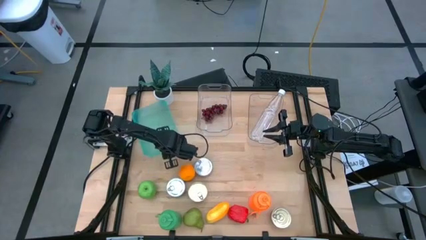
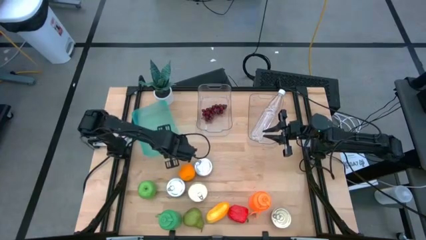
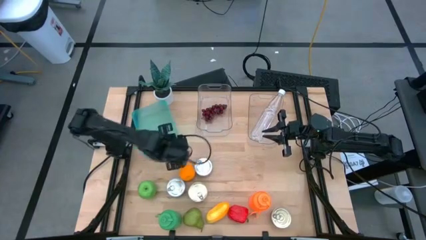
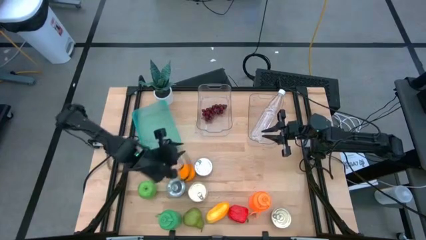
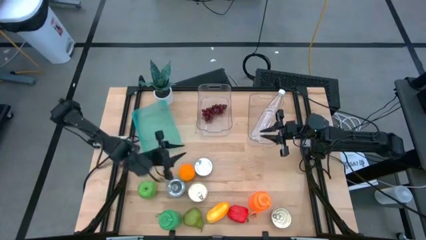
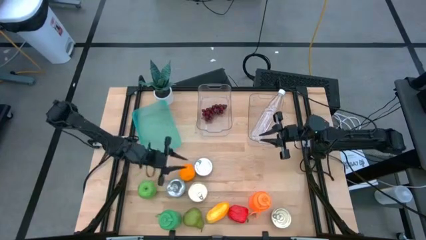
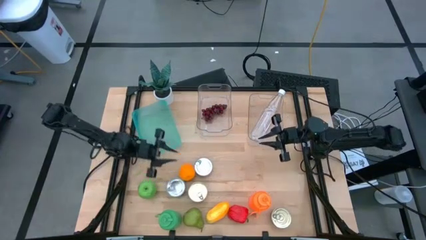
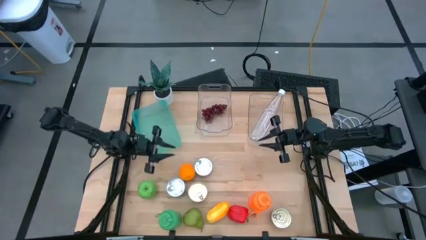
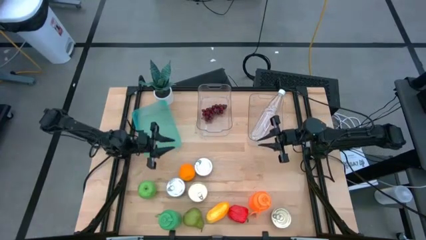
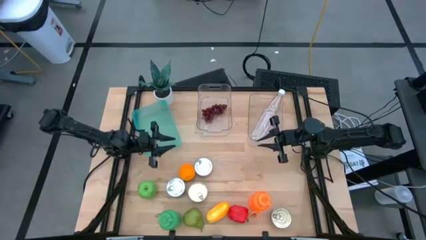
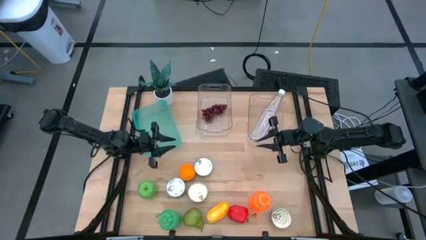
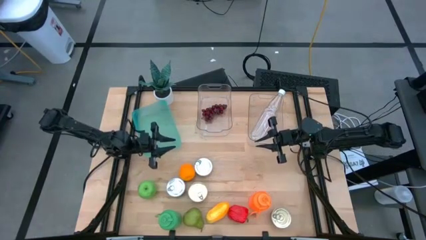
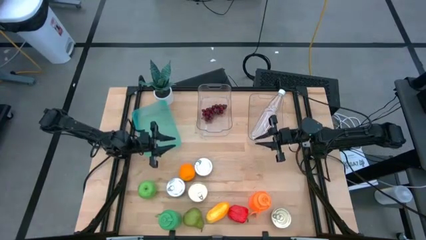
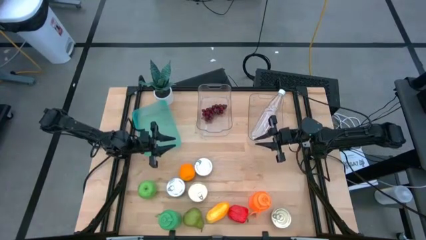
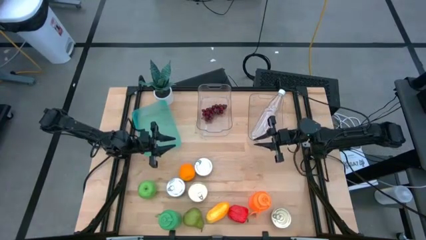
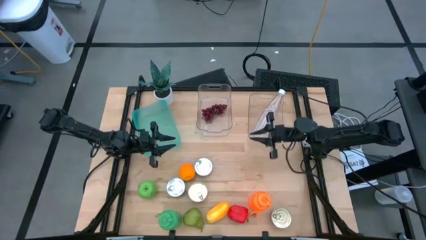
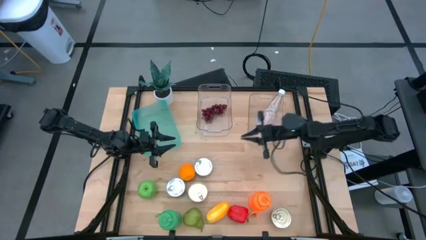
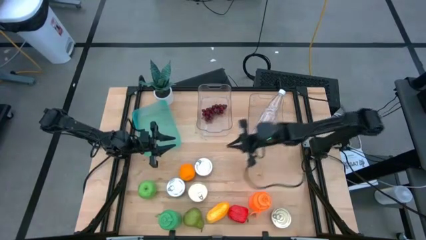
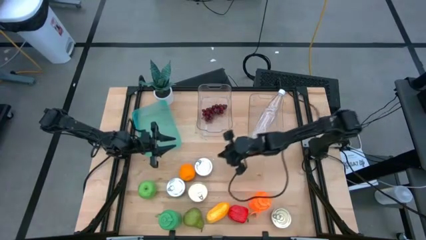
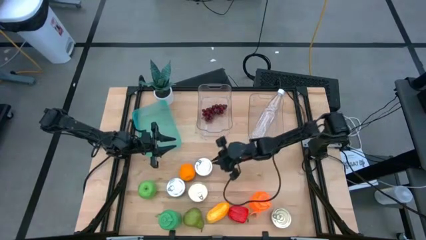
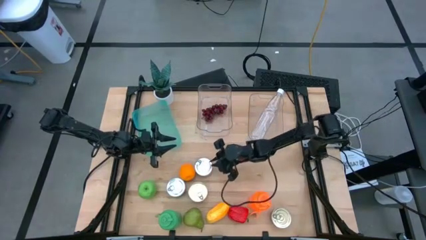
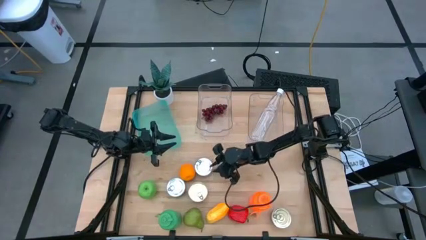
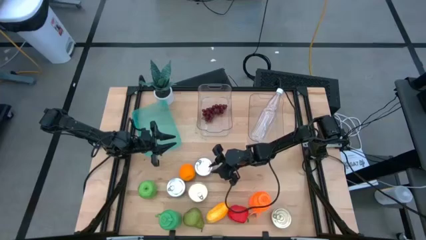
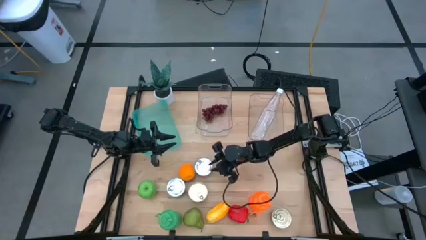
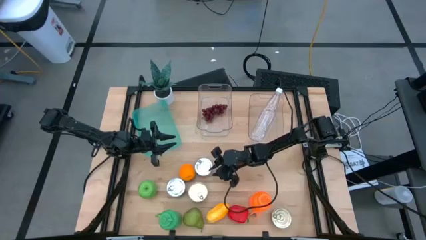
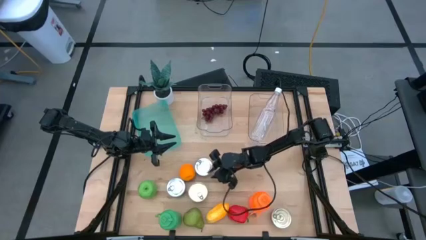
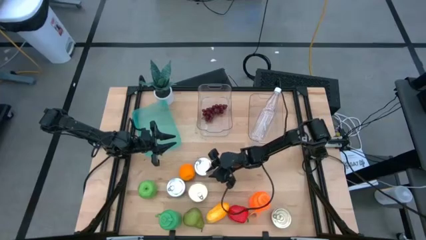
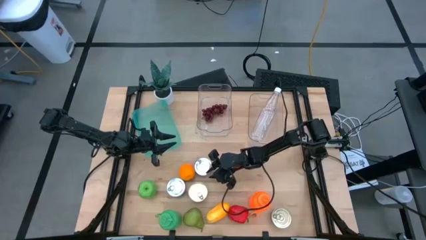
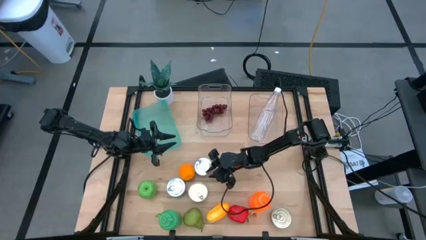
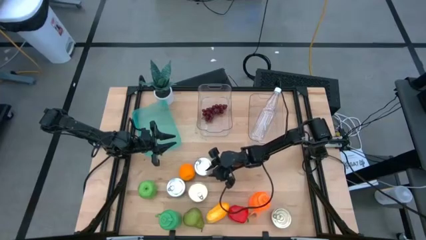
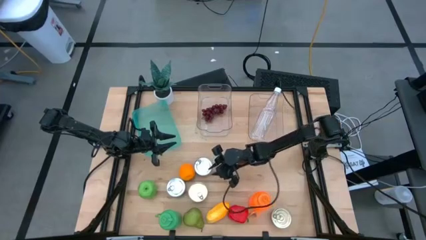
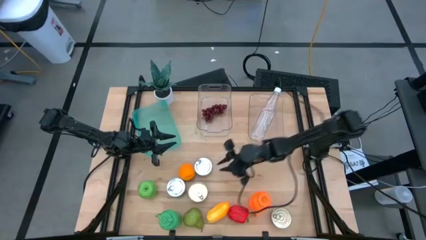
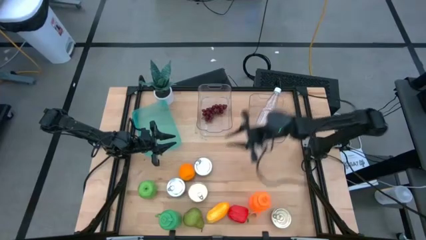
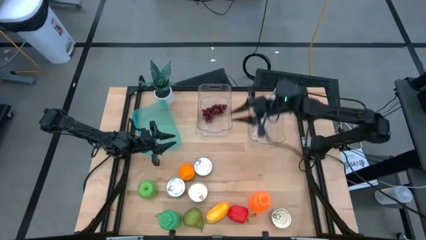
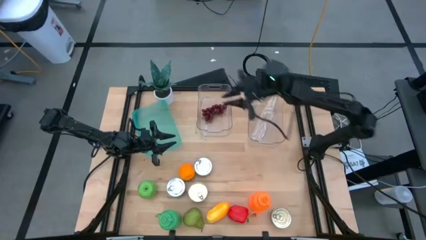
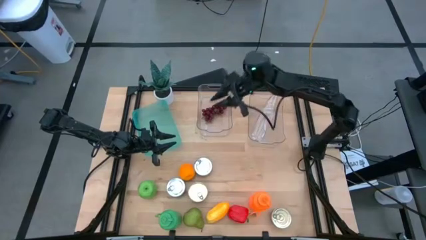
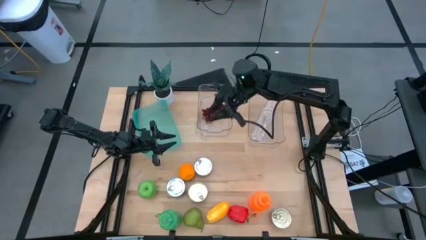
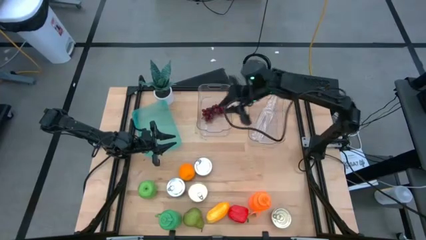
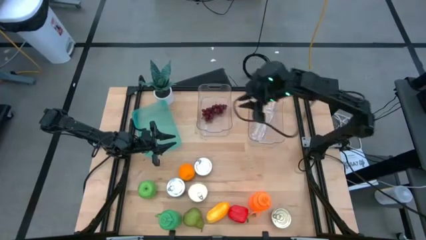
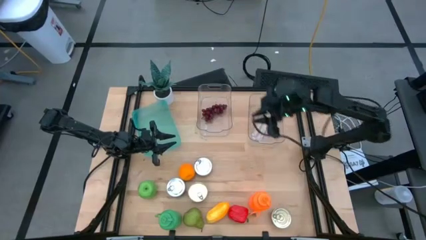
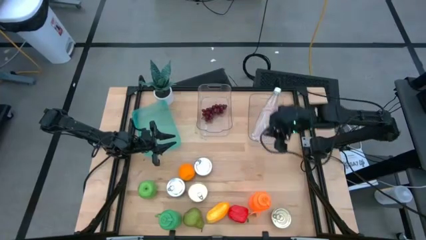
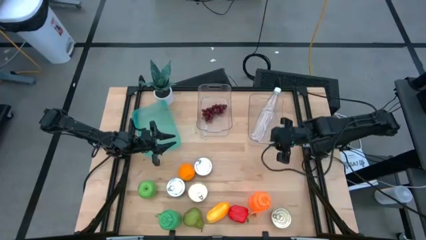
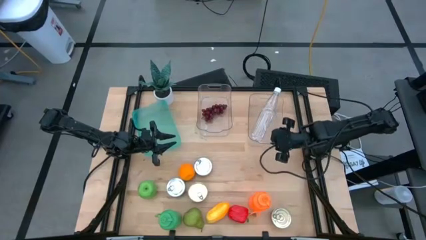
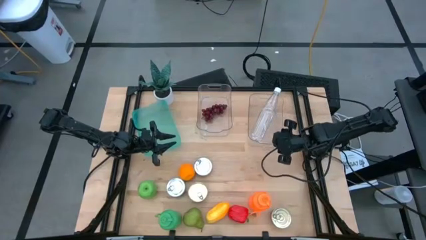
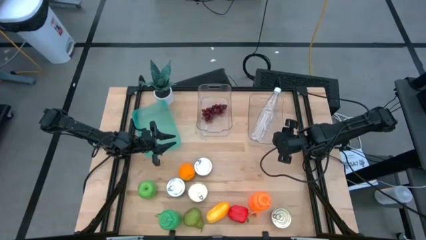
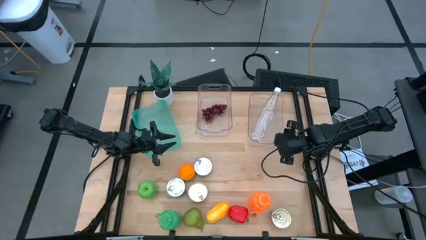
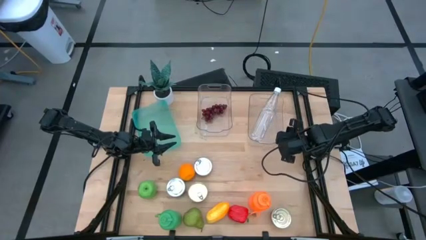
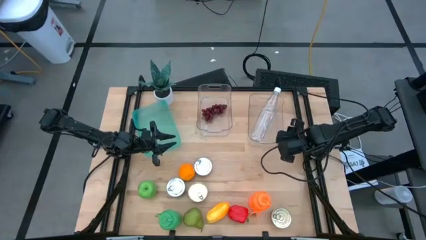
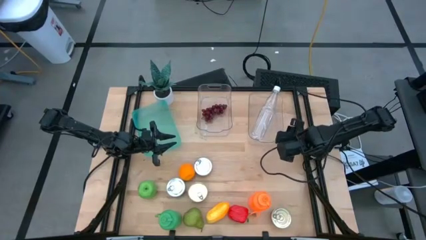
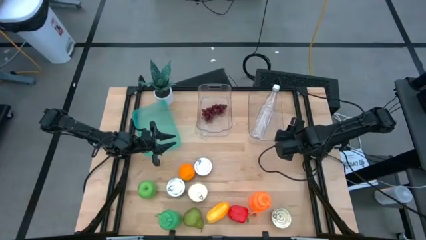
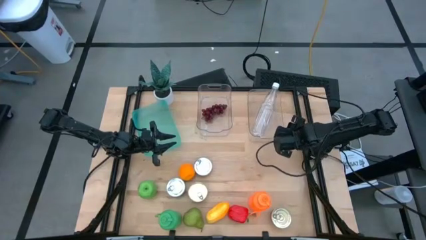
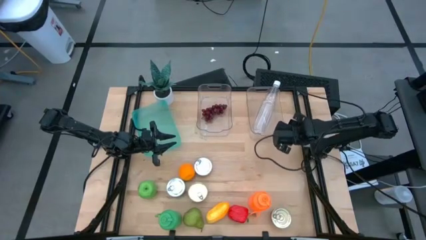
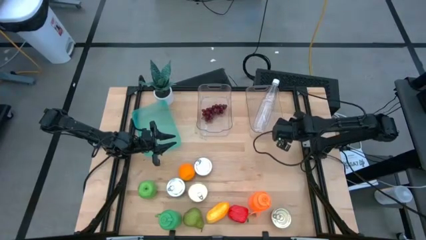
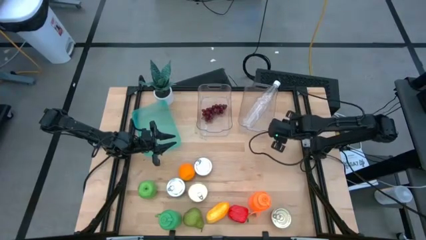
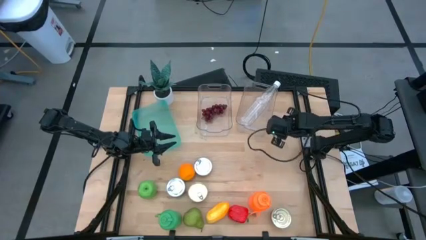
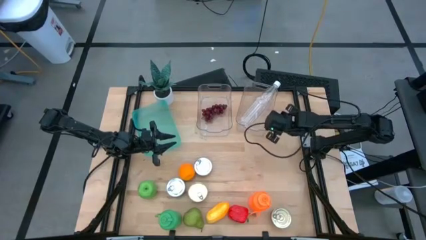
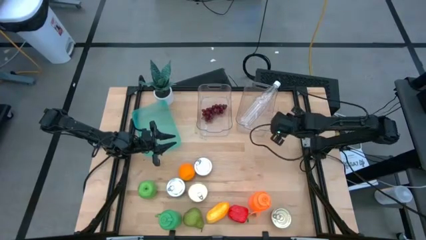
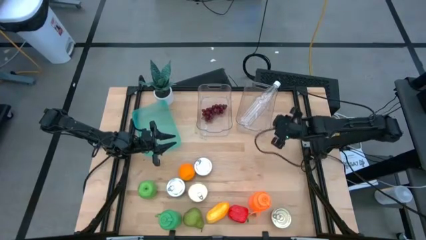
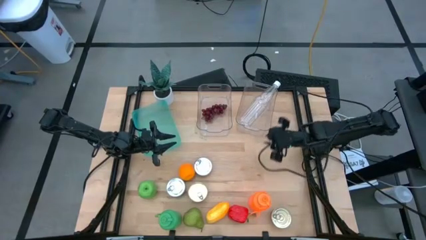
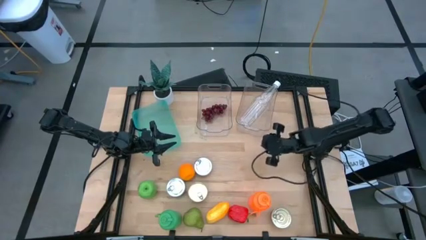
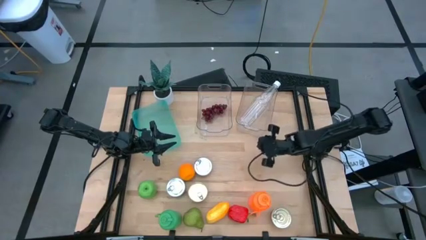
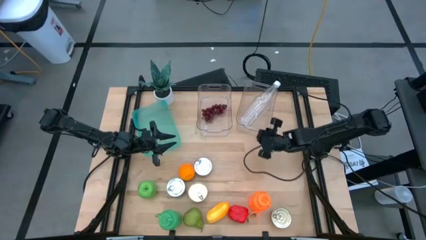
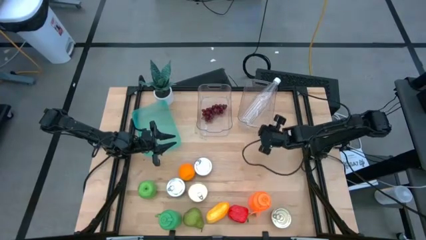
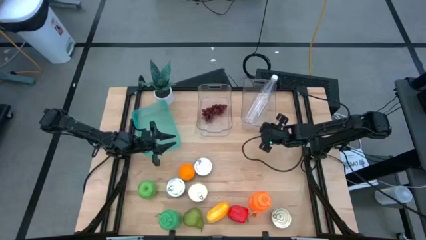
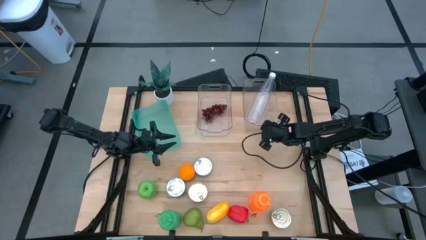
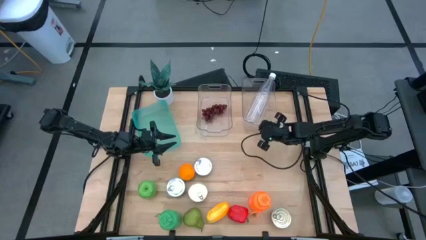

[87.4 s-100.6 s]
Task: Pick & Place Food Item
Adjust the right transparent bin on the table

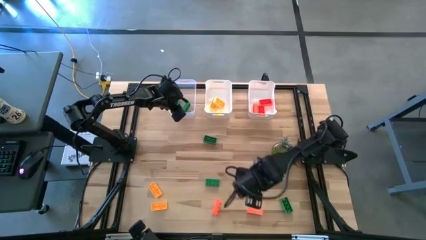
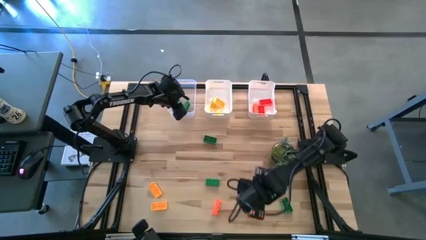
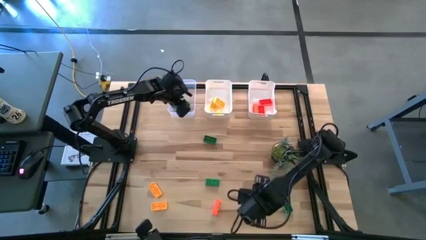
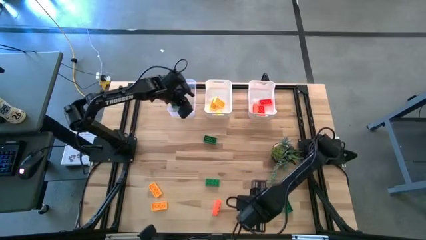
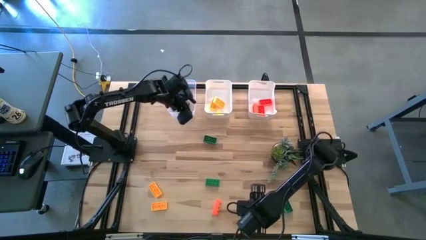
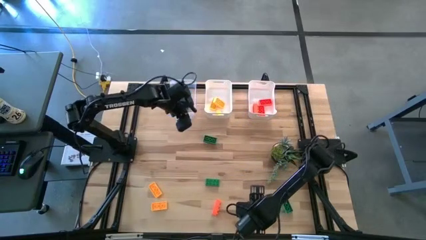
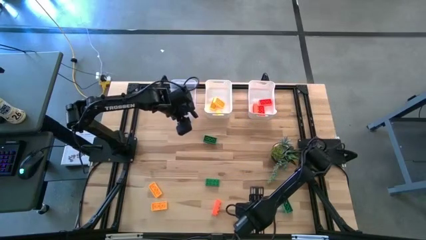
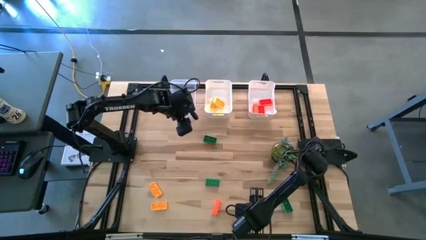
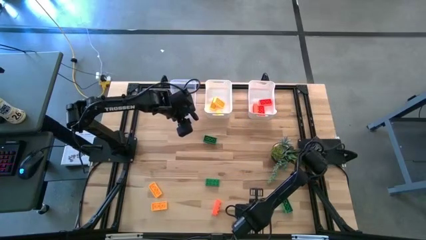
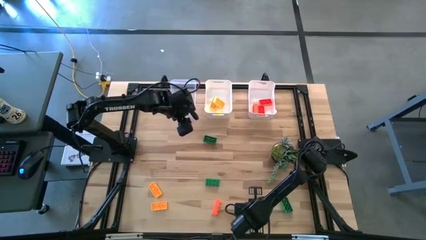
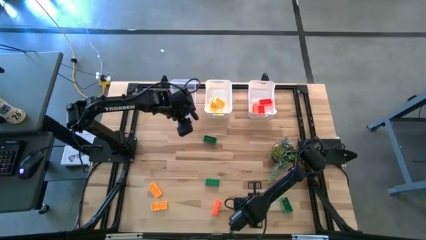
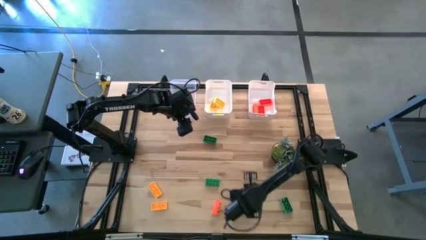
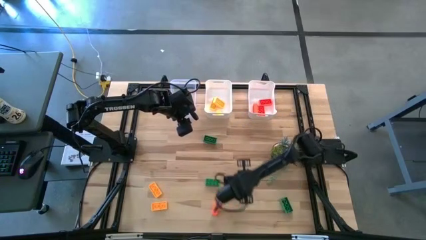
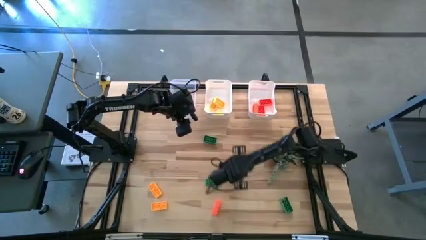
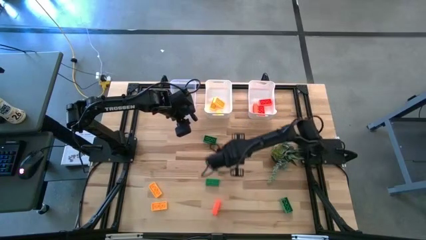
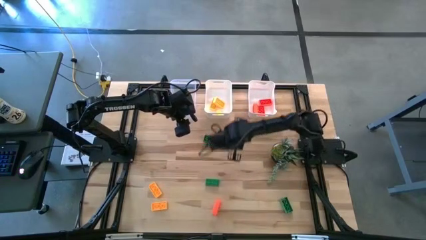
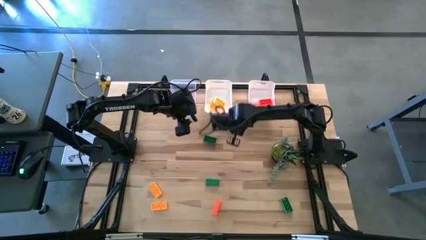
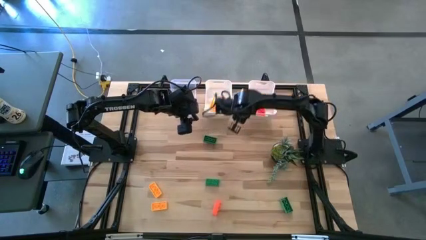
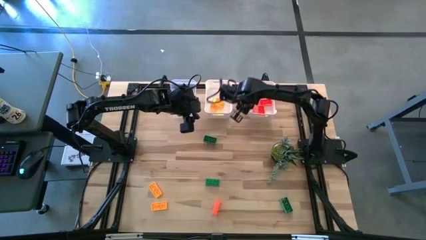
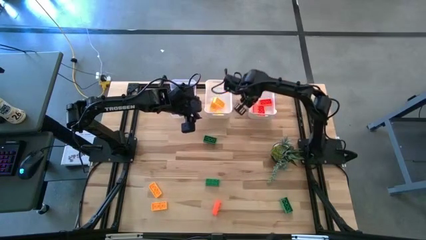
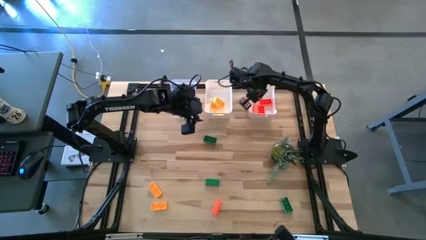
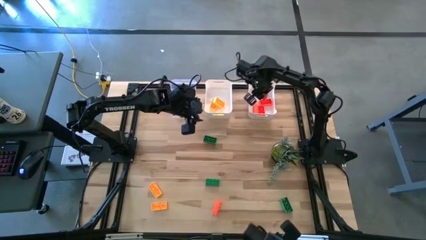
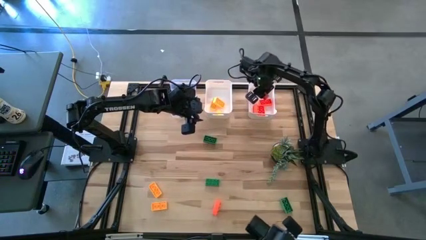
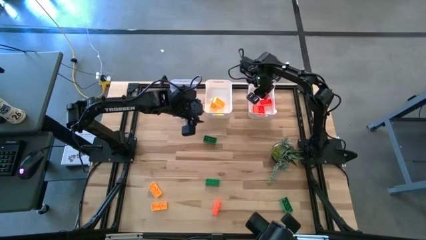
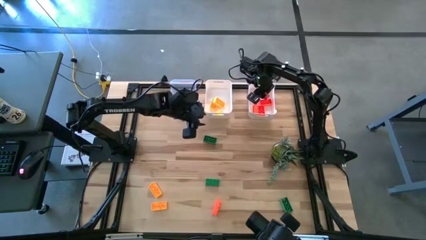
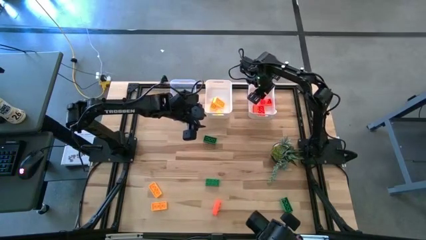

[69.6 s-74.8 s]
Task: Sort & place blocks by color
Put the orange game piece into the right white bin
